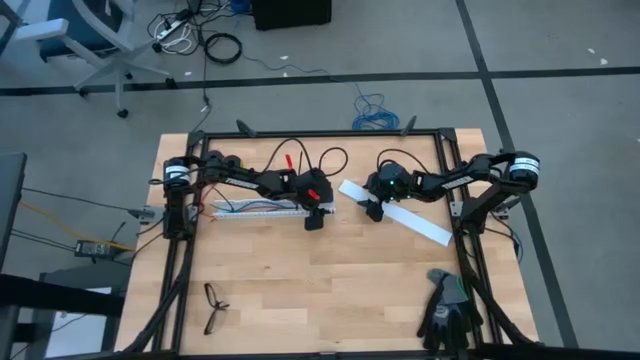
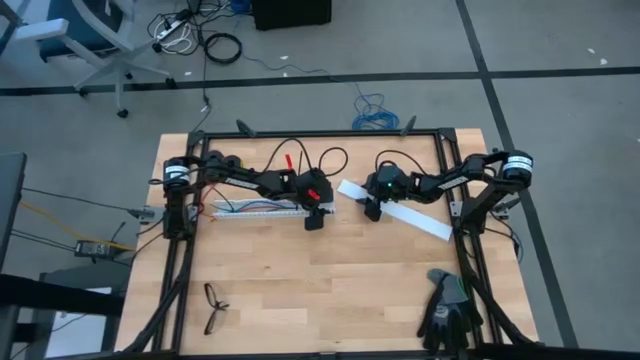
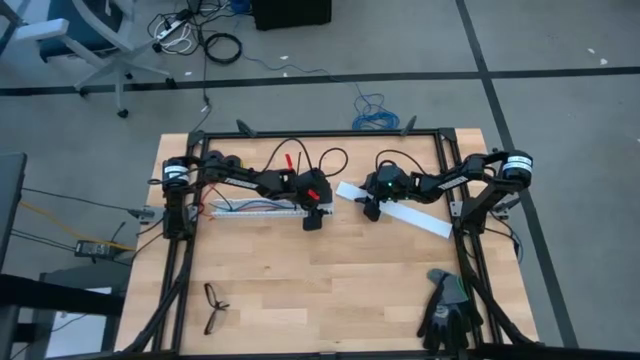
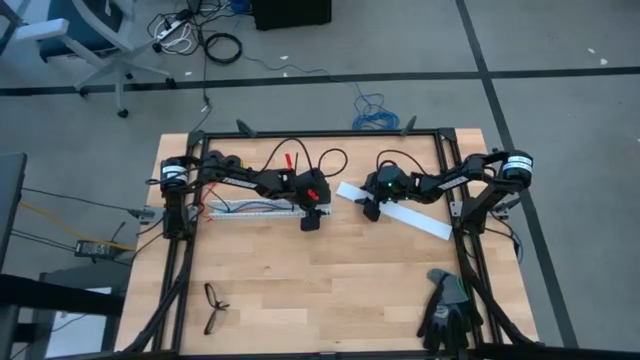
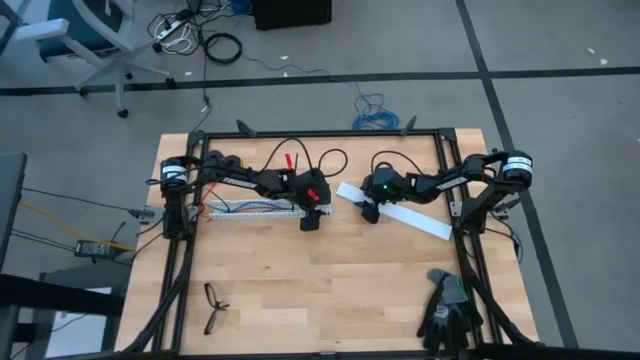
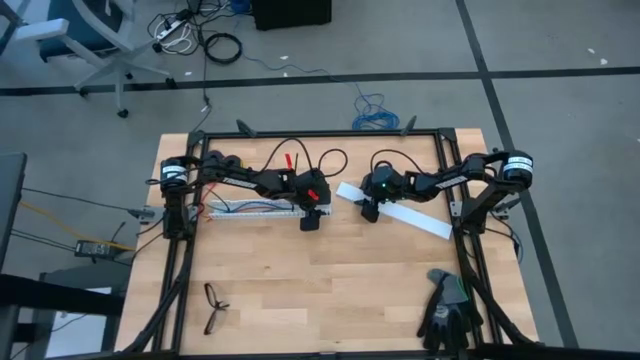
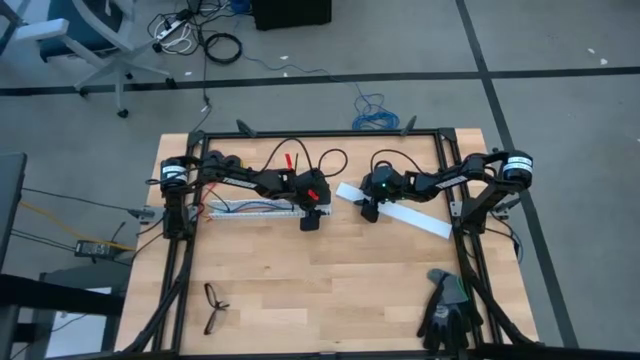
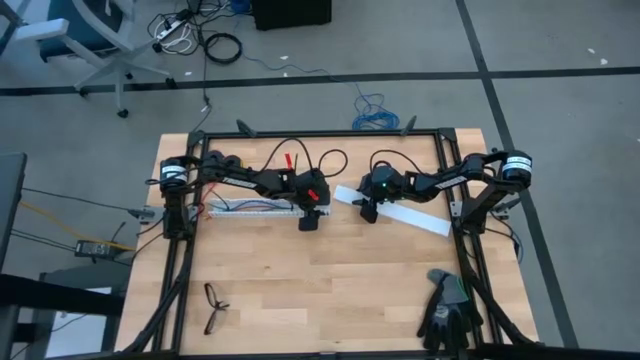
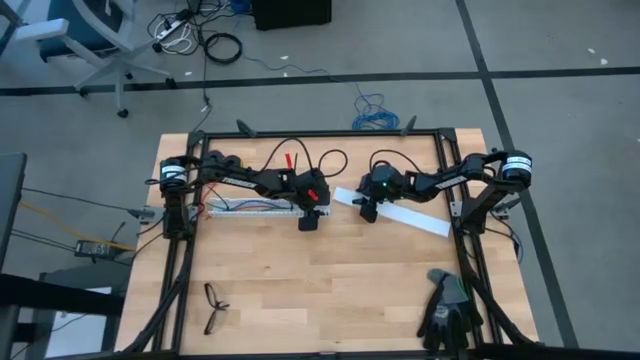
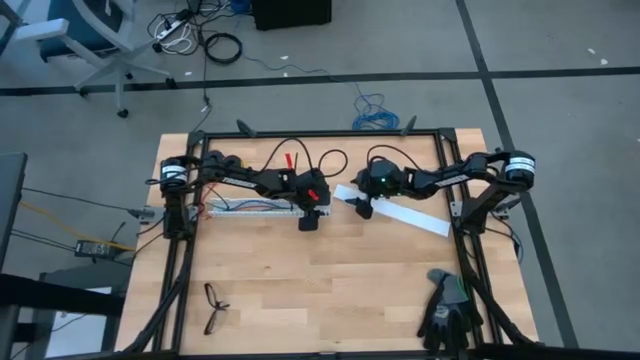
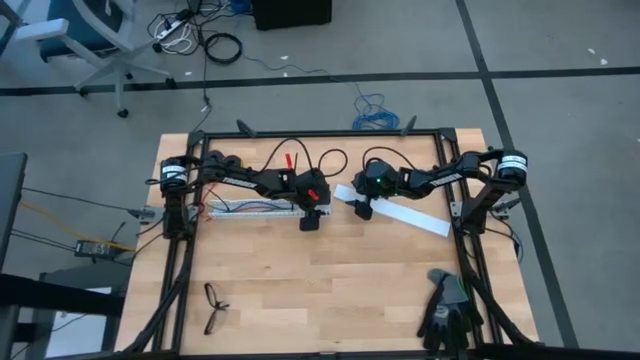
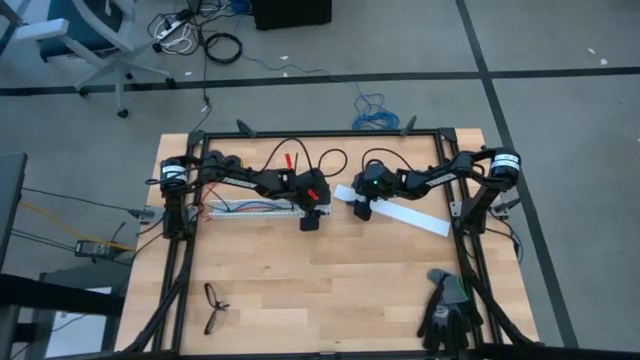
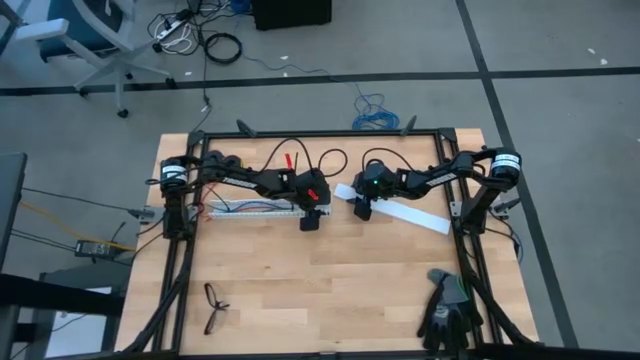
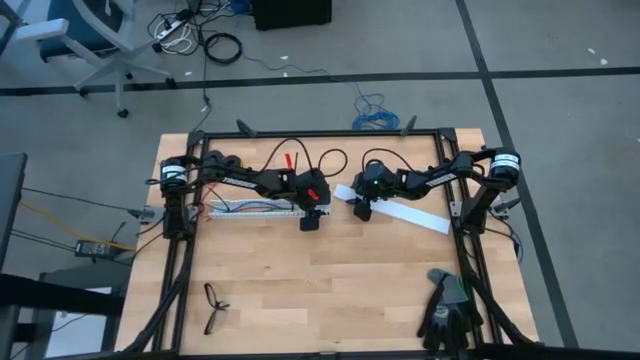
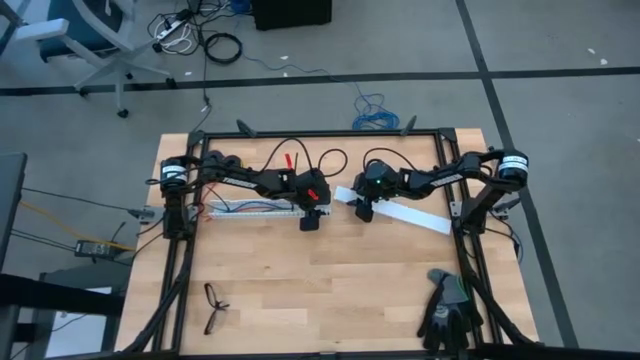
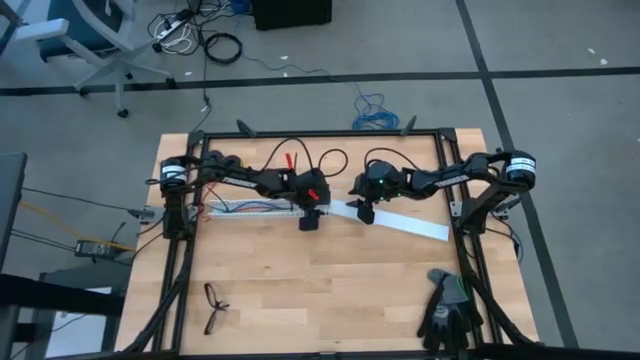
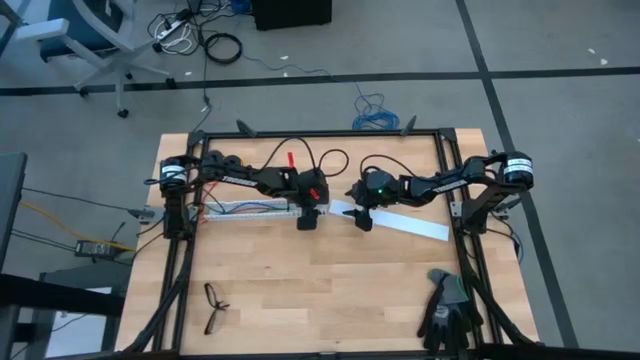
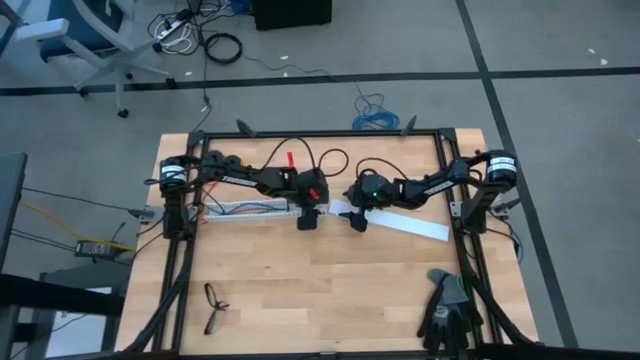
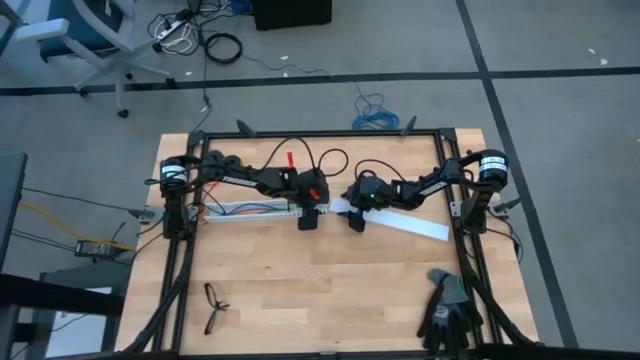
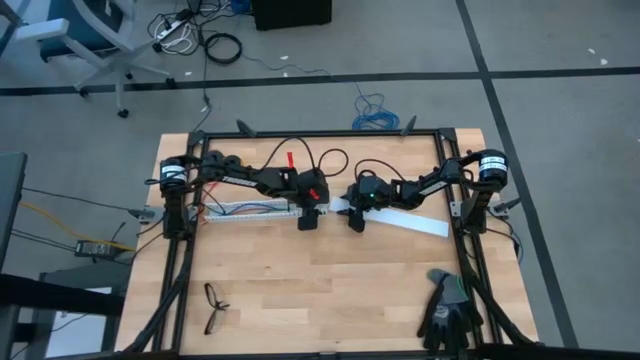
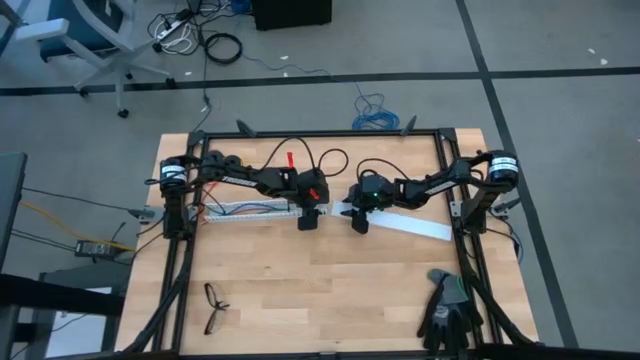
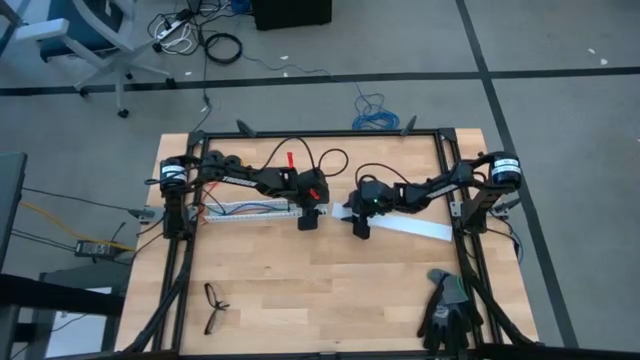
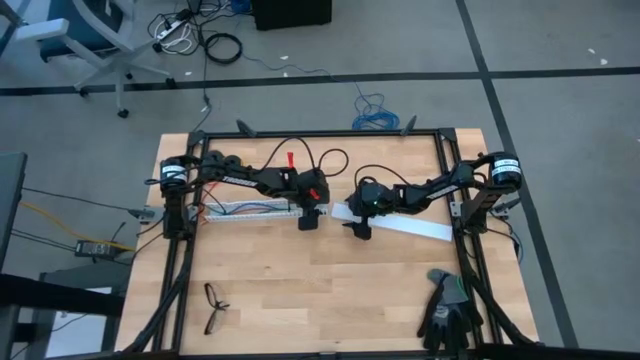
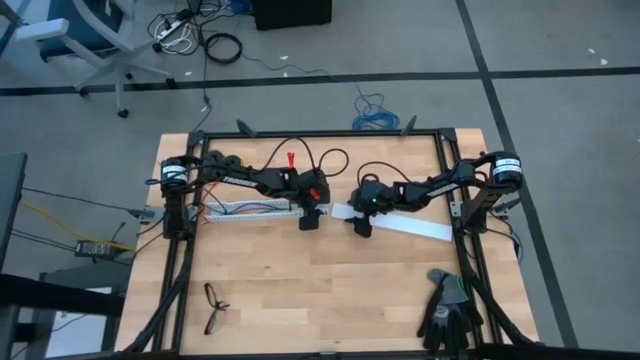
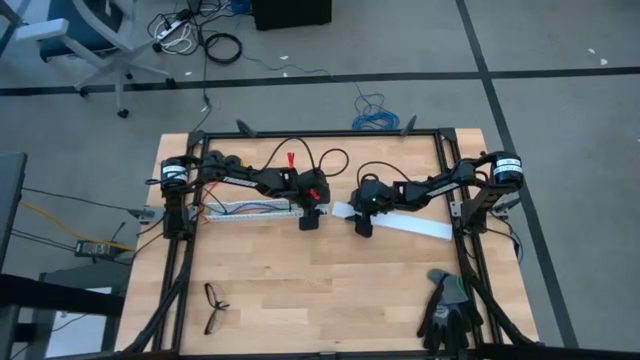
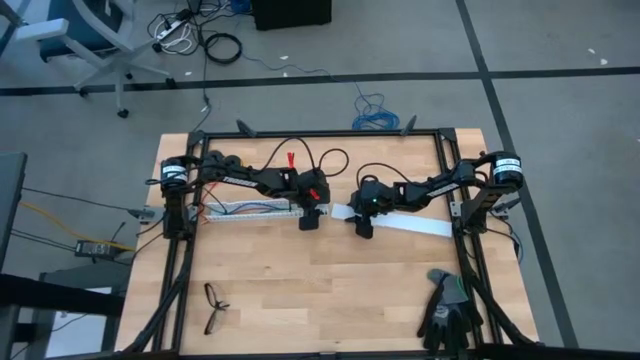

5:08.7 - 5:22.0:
Task: Ziptie cables
Close the white cable duct

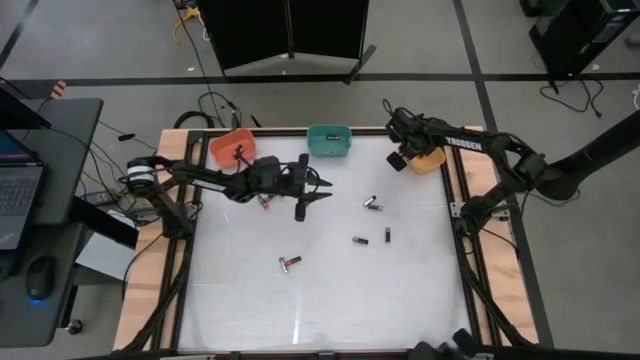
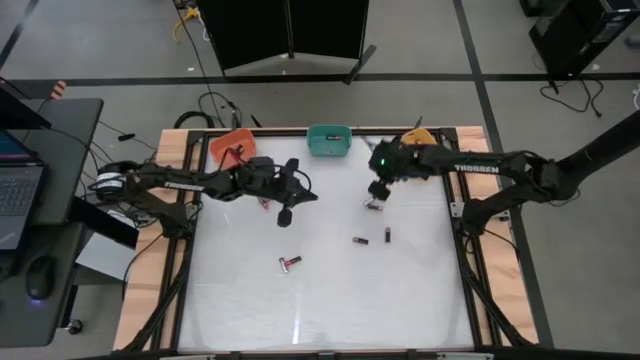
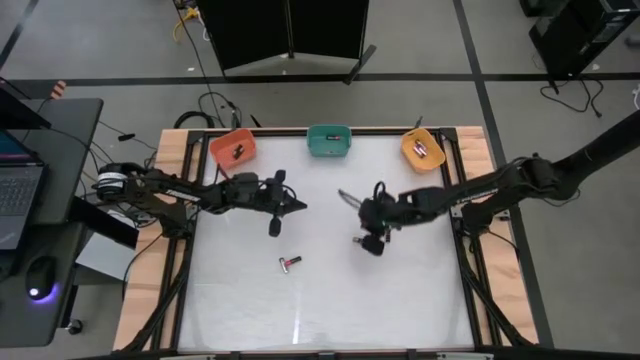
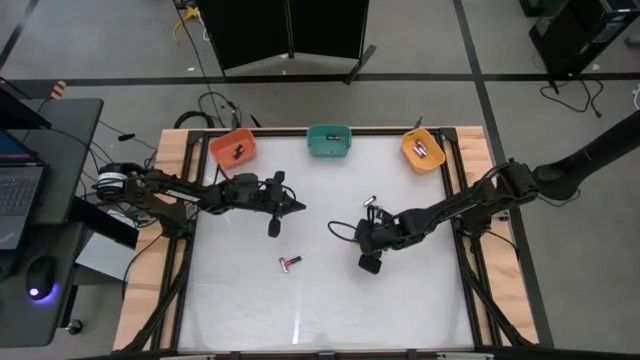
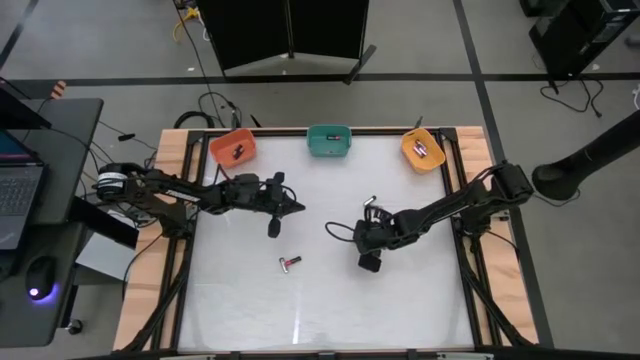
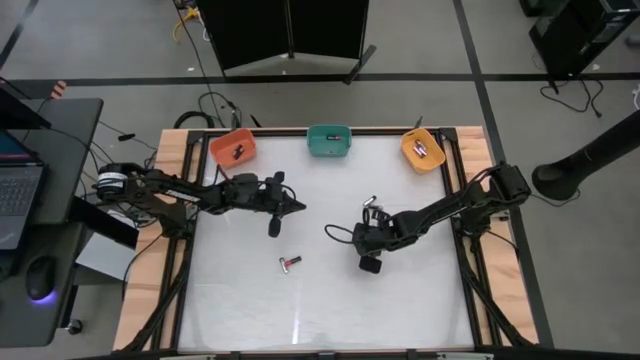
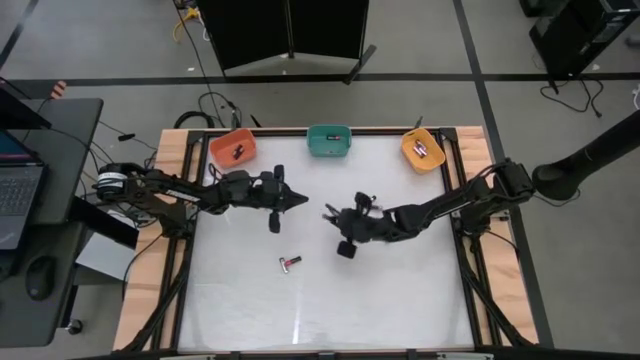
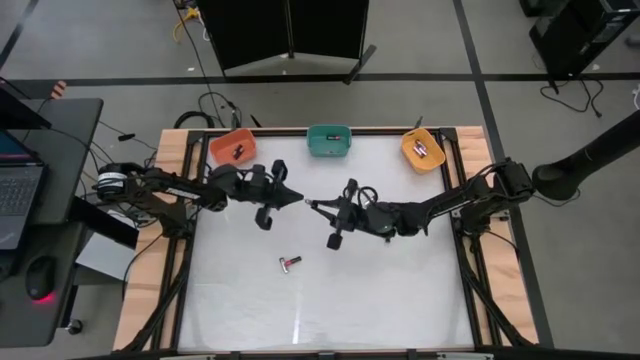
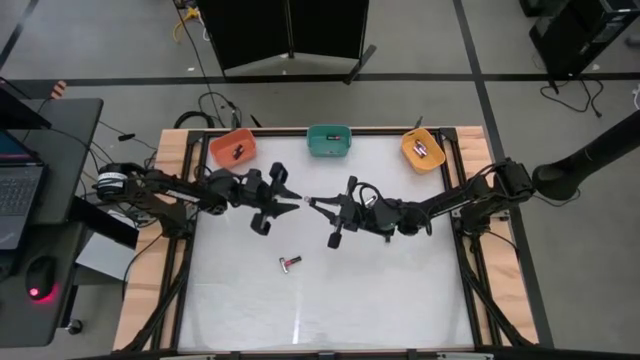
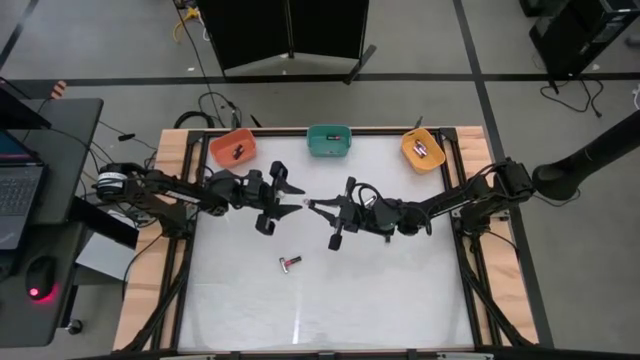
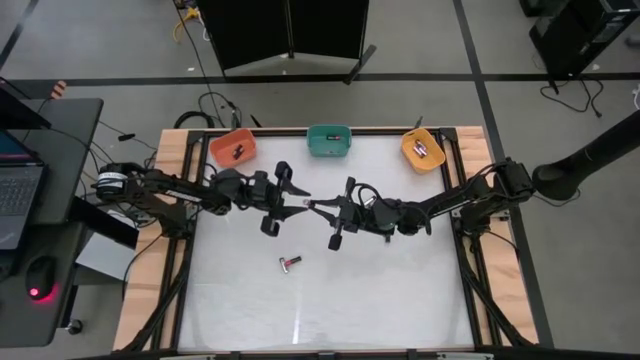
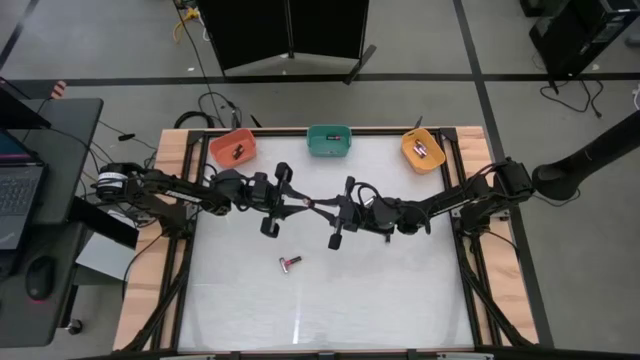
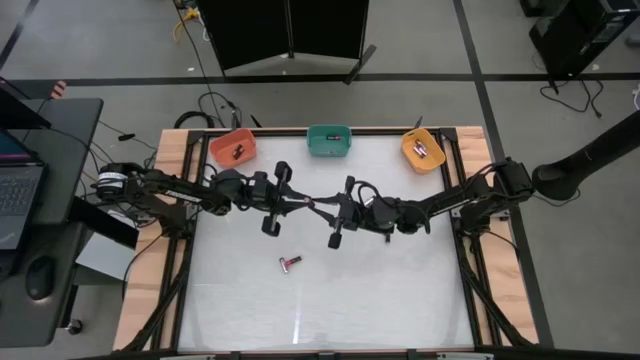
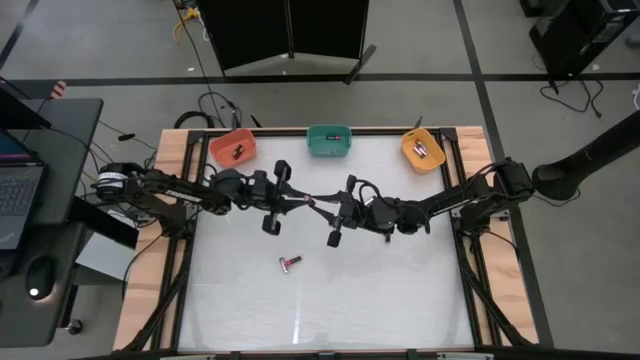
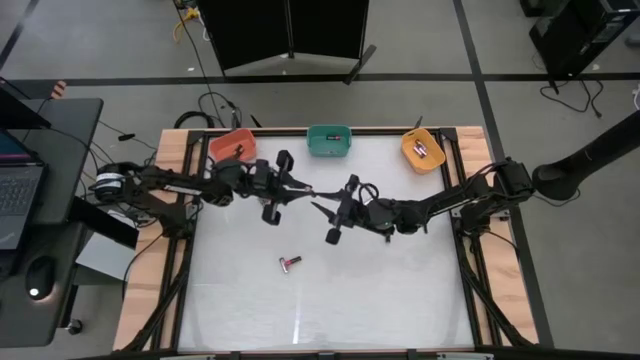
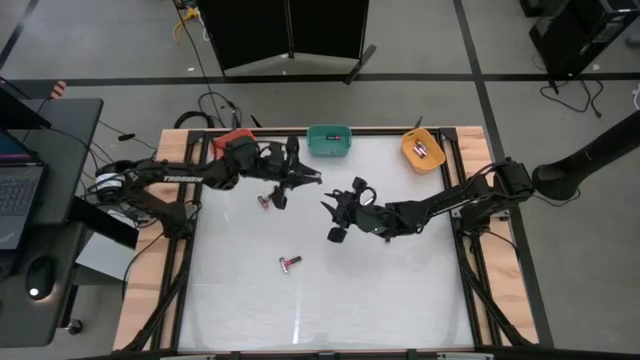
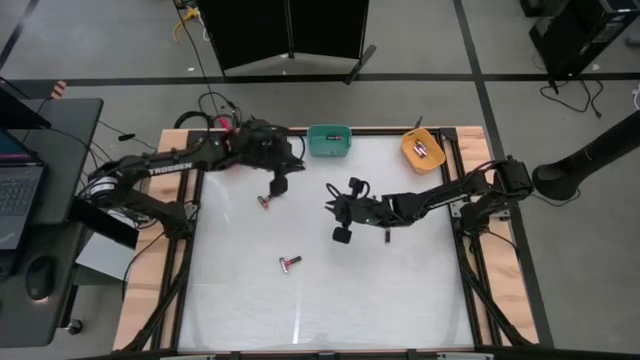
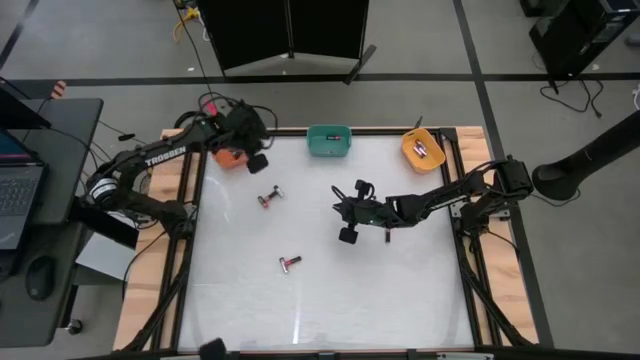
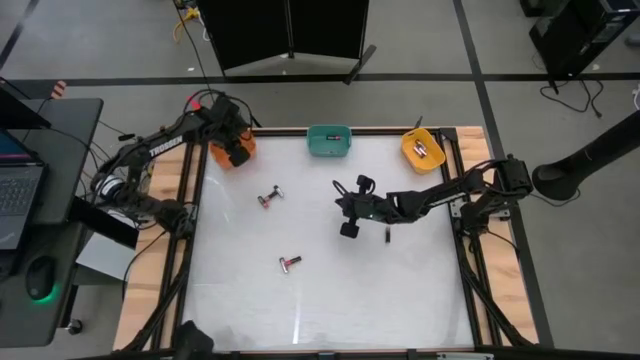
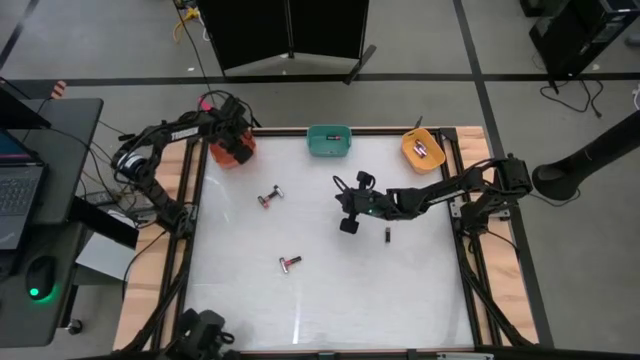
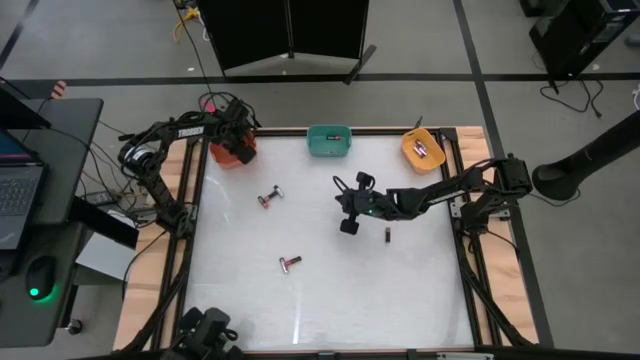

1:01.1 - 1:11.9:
Task: Sort batteries
Put the brown battery into the orange bin
